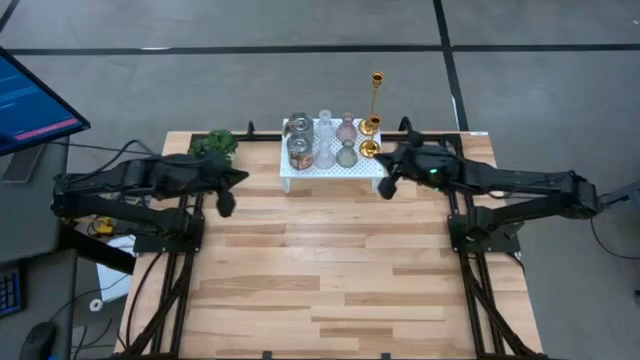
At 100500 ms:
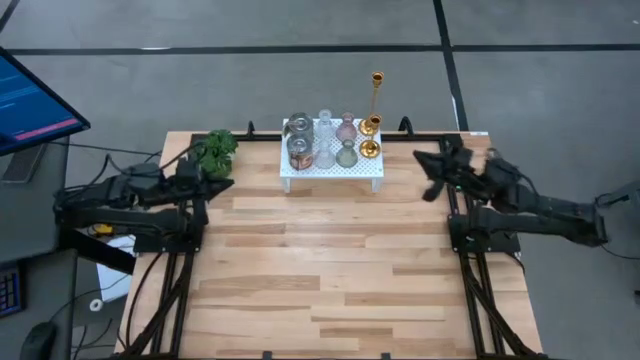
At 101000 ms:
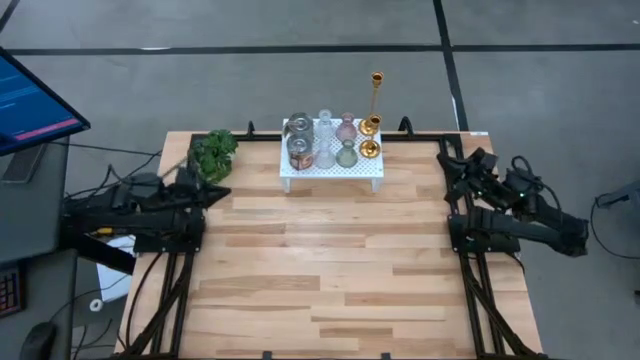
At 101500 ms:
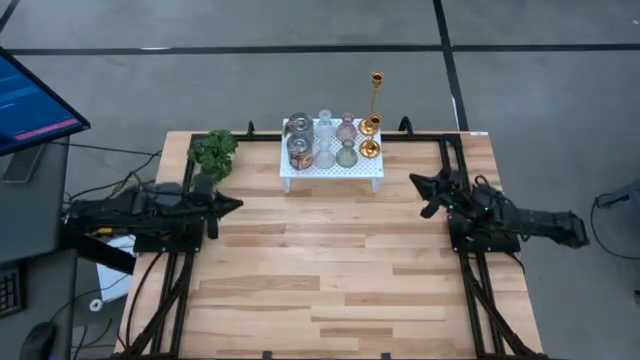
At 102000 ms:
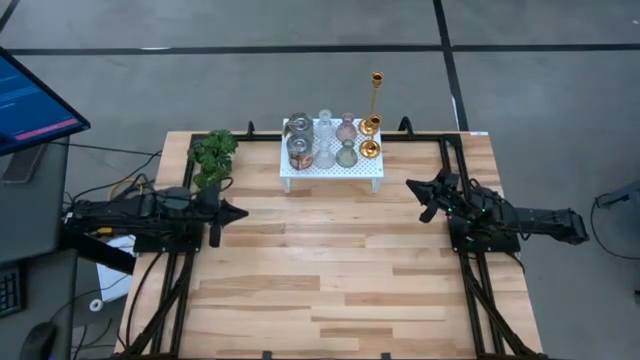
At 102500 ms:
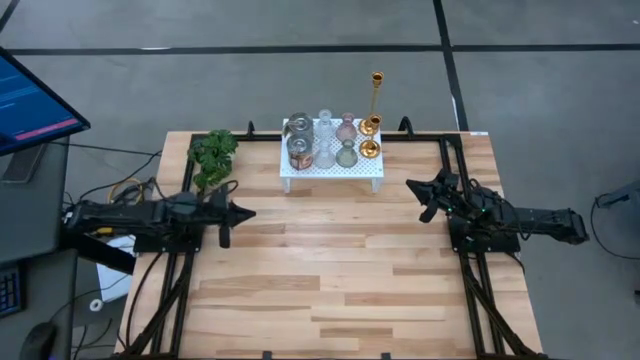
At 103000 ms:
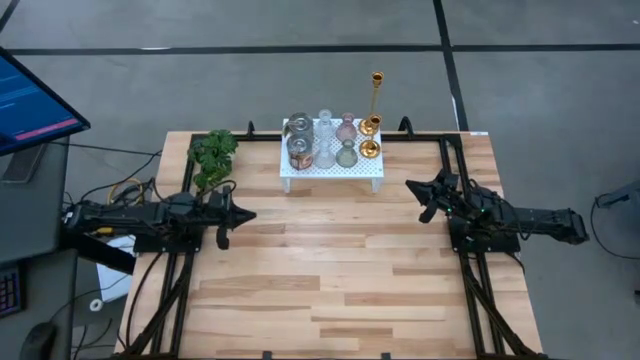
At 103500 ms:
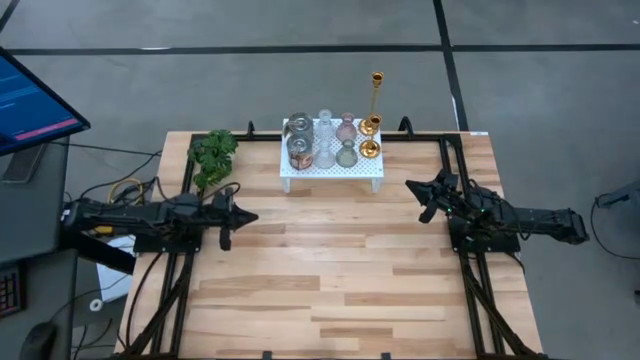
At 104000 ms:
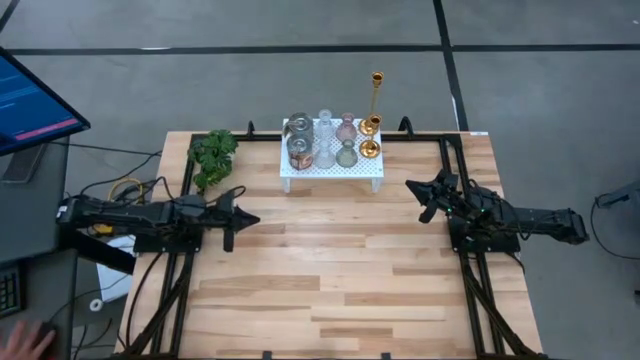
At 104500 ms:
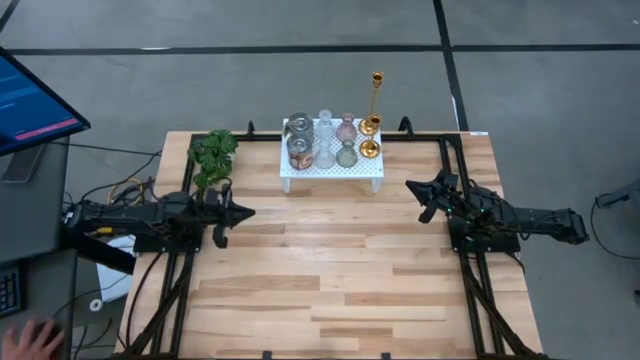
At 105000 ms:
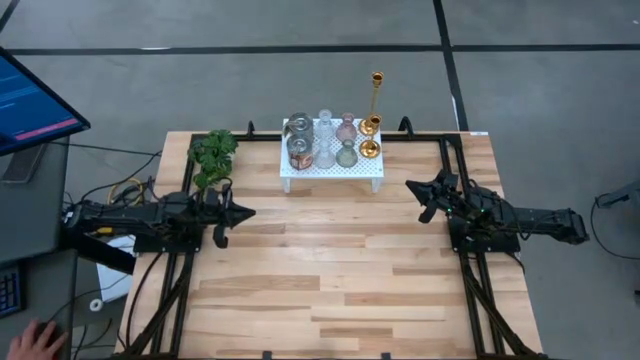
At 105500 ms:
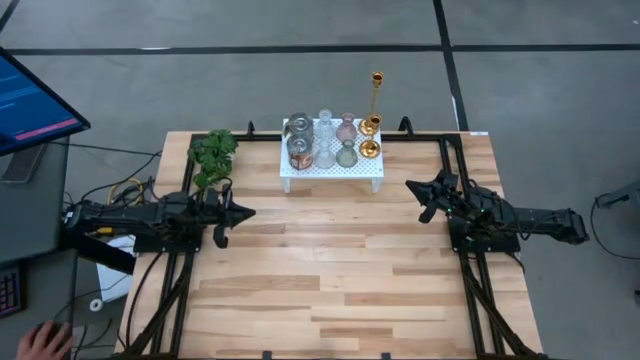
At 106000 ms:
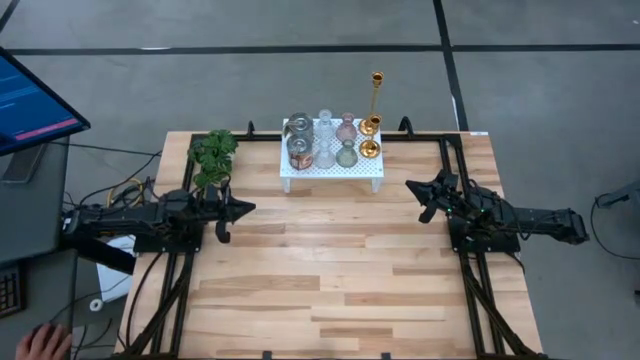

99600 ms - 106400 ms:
Task: Pick & Place candle stick holders
Return to Home Position

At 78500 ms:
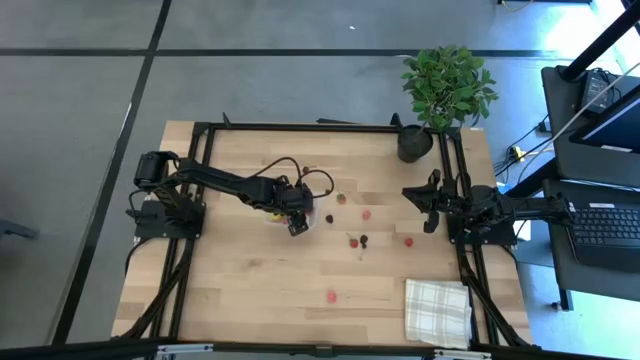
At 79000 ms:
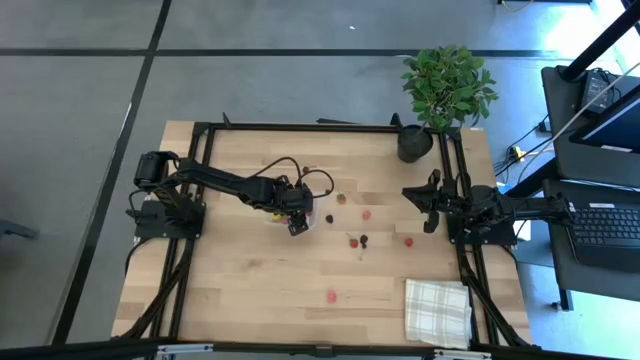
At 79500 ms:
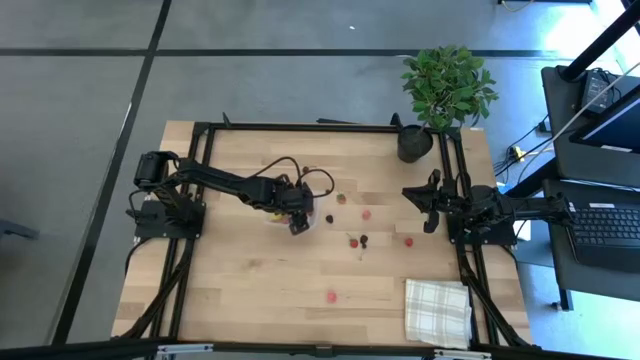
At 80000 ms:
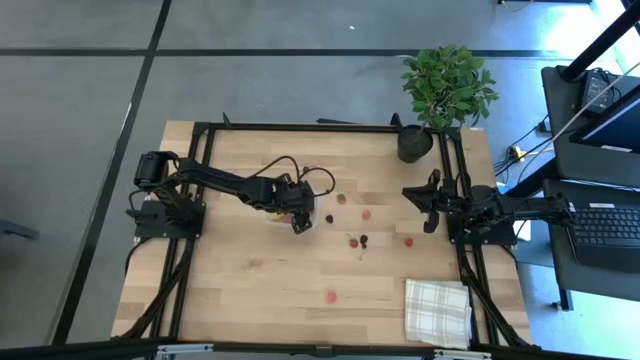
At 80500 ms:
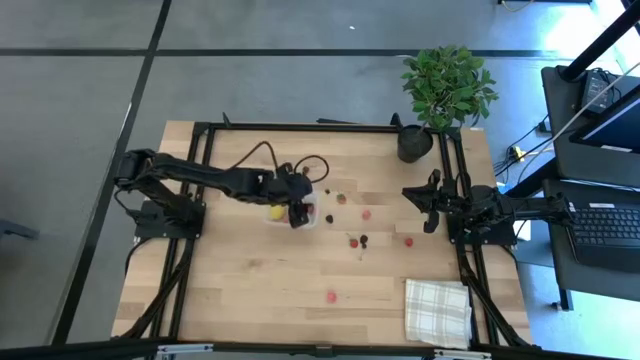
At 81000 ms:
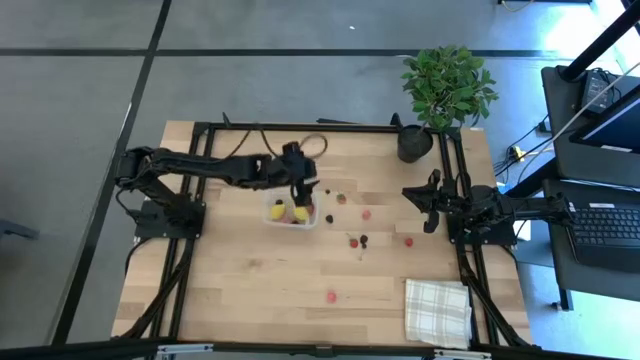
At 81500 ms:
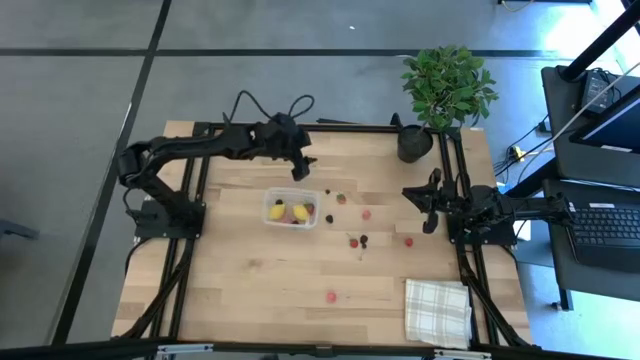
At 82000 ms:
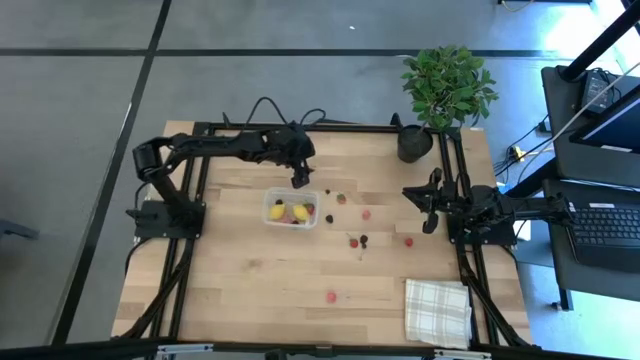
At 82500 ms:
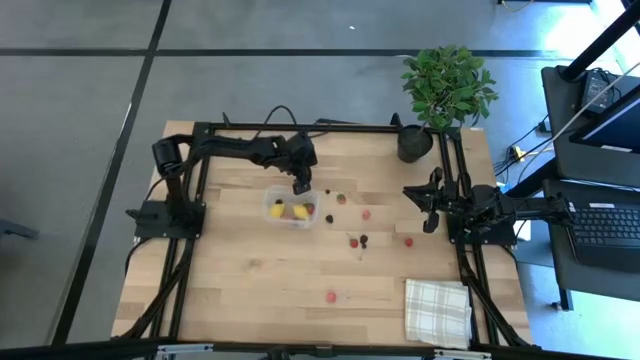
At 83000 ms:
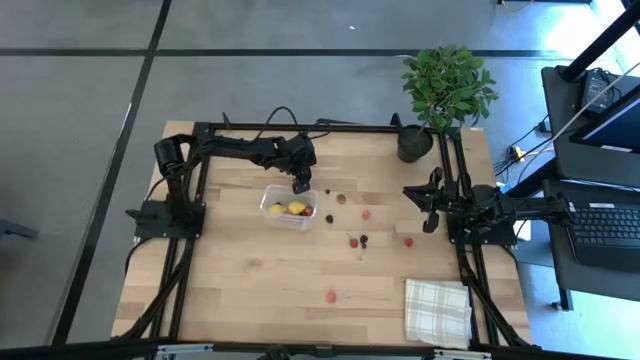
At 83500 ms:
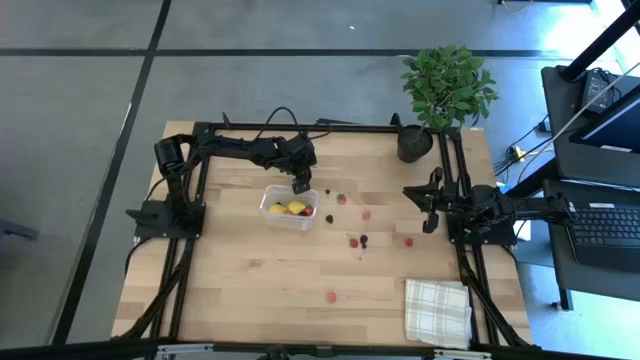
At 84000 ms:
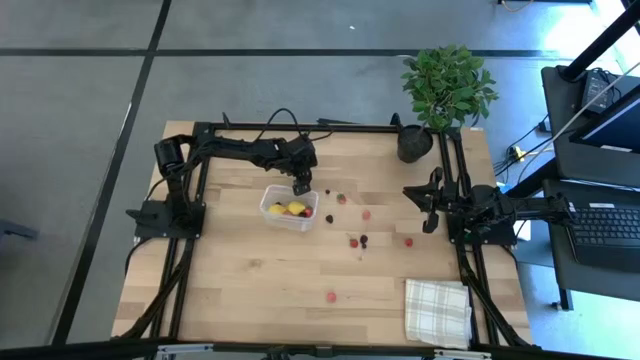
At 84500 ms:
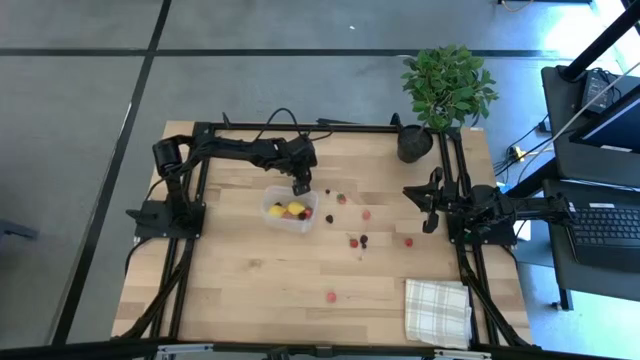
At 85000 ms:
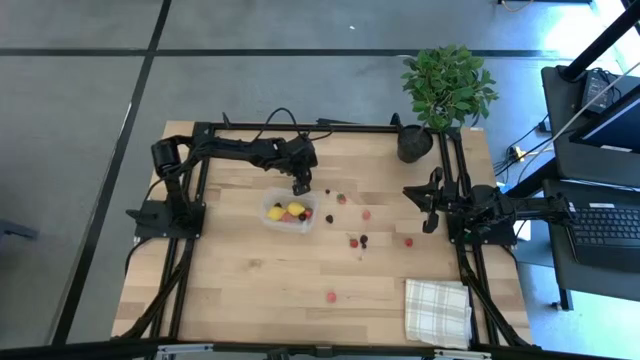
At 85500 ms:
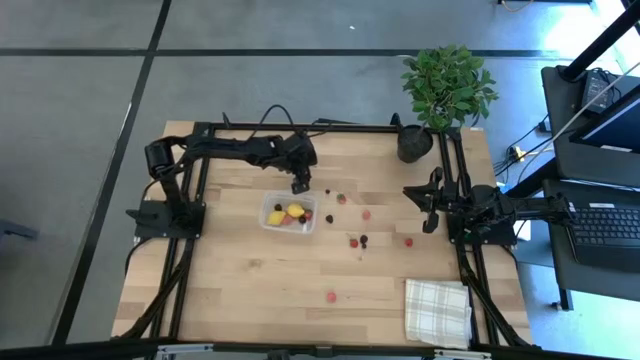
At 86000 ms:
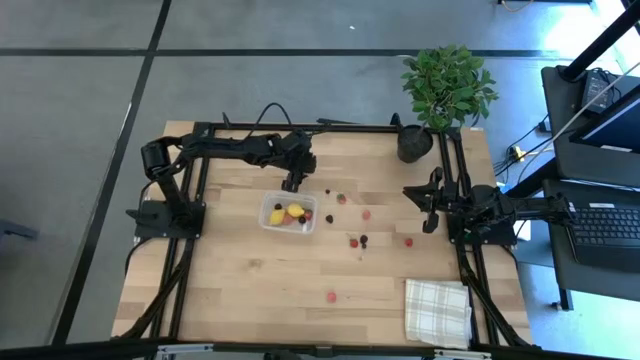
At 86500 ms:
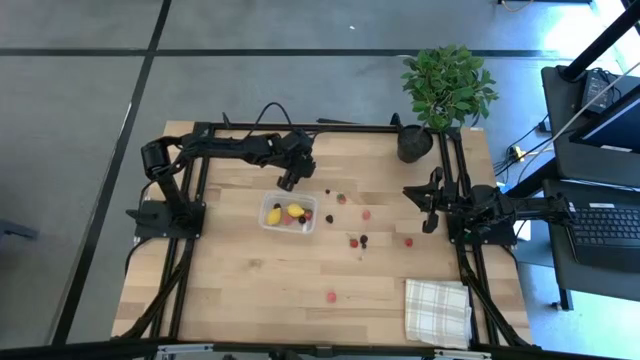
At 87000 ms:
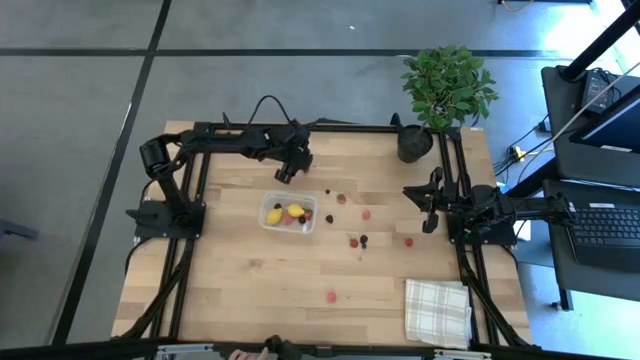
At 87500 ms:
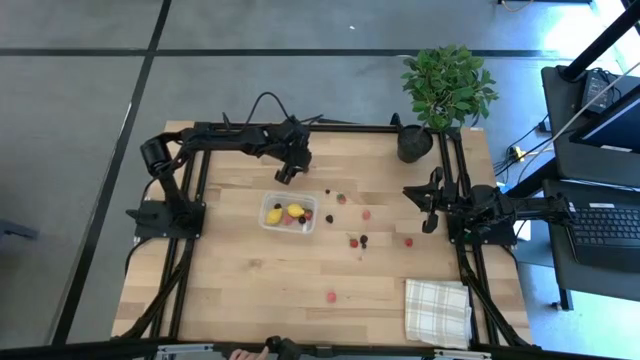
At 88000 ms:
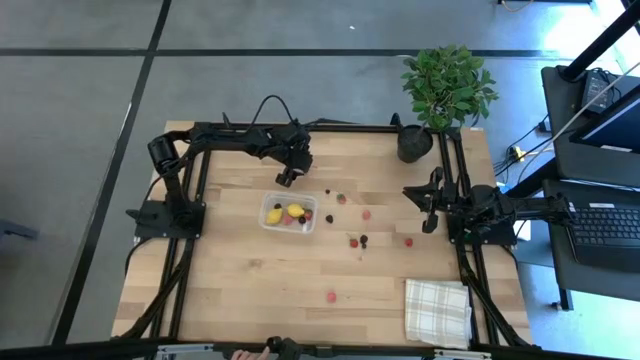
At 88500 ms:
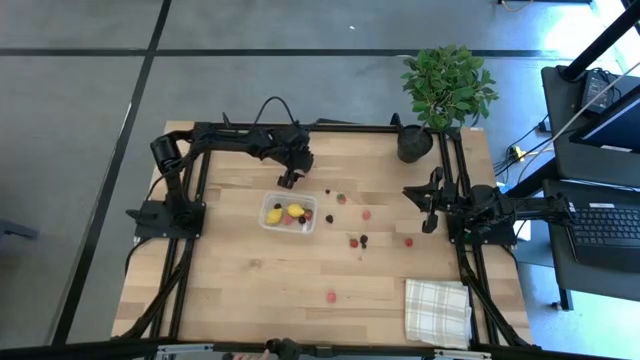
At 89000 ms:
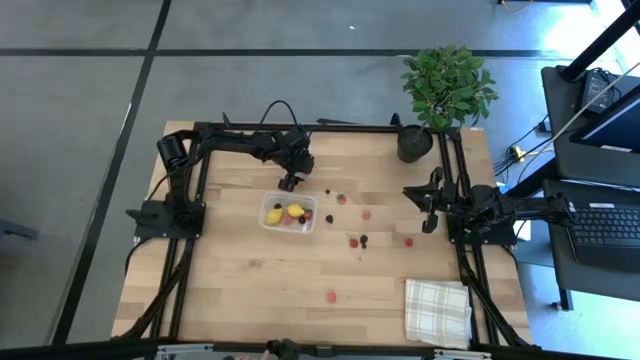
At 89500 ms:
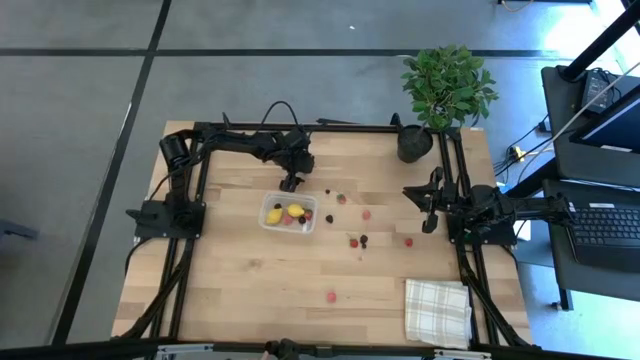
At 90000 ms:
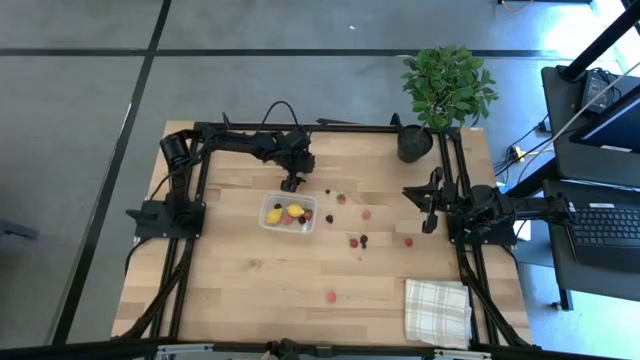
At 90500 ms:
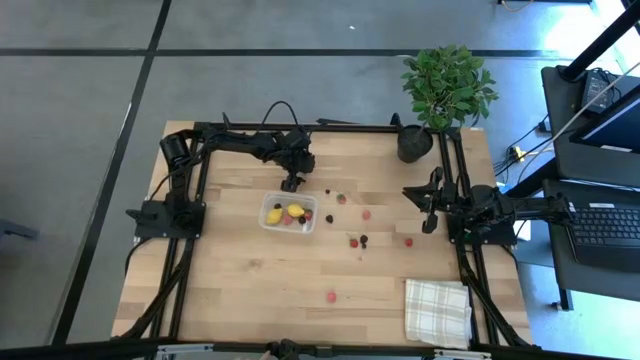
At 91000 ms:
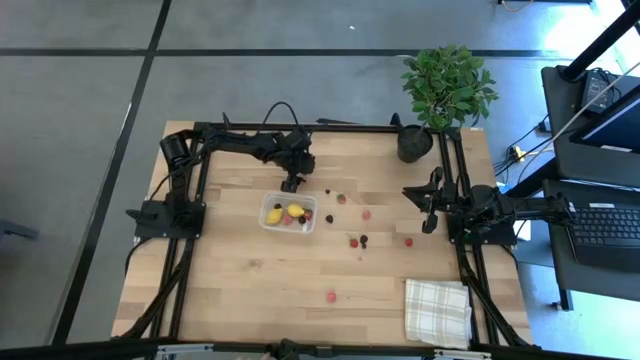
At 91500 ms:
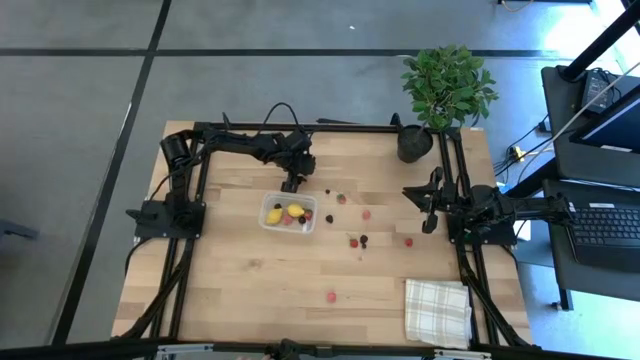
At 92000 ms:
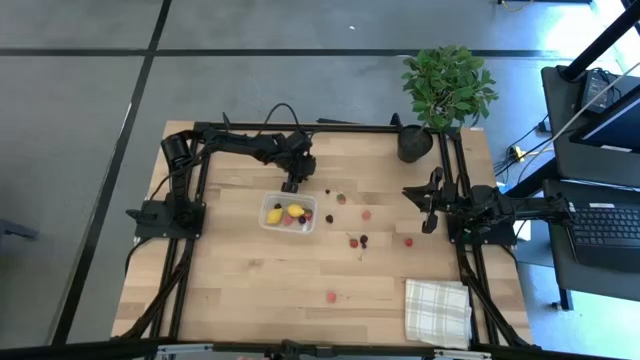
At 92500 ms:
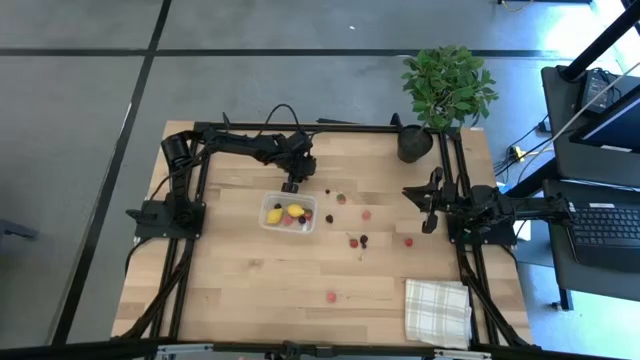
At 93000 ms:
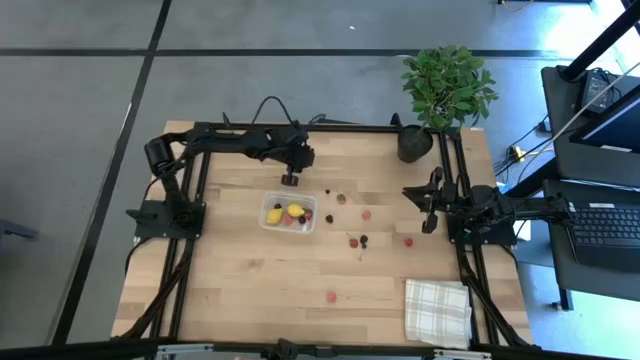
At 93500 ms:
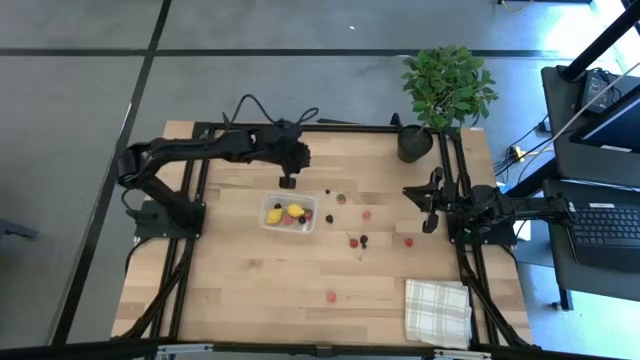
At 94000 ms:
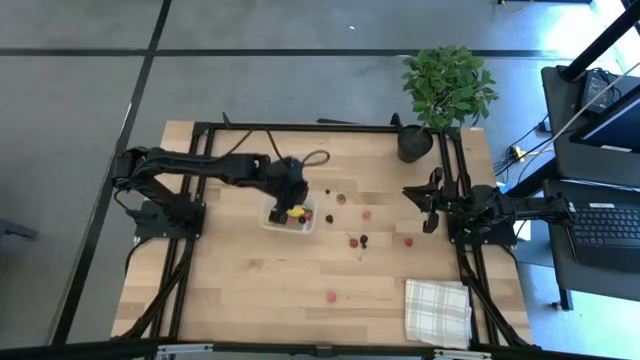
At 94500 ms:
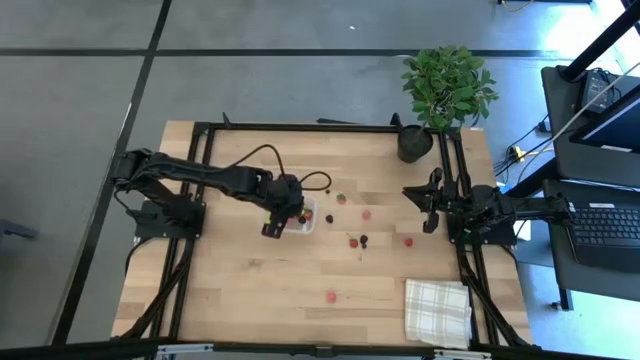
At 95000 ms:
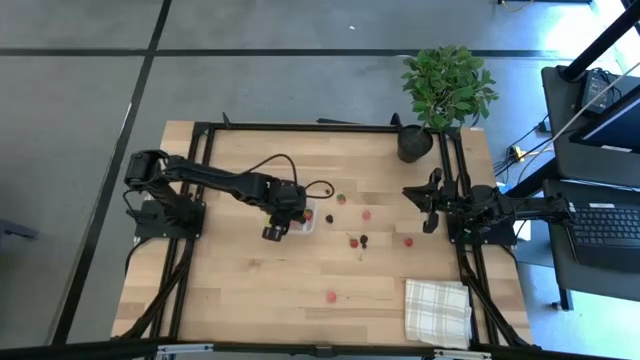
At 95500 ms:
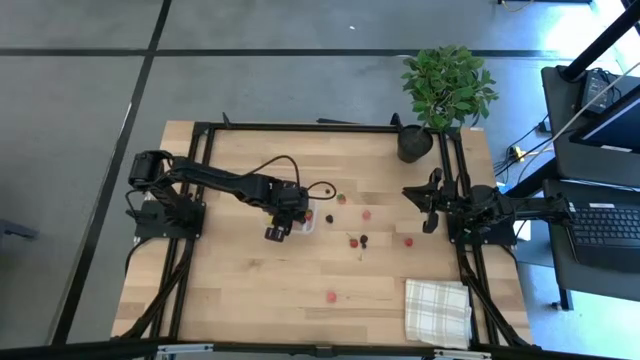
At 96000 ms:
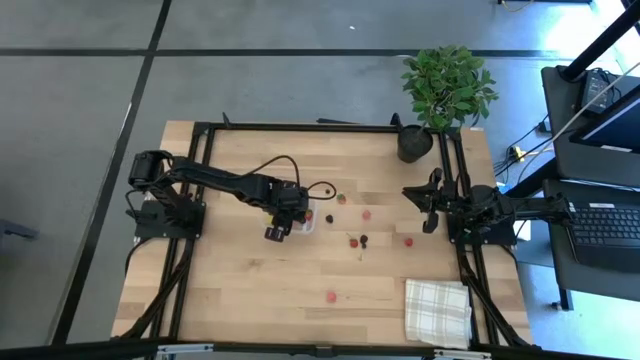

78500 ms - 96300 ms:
Task: Pick and placing Produce into tupperware
Put the red cherry into the transparent bin
